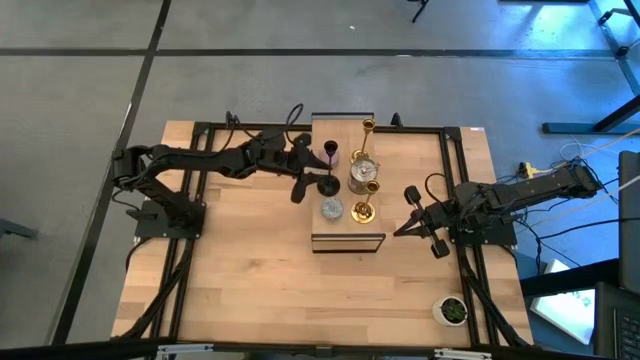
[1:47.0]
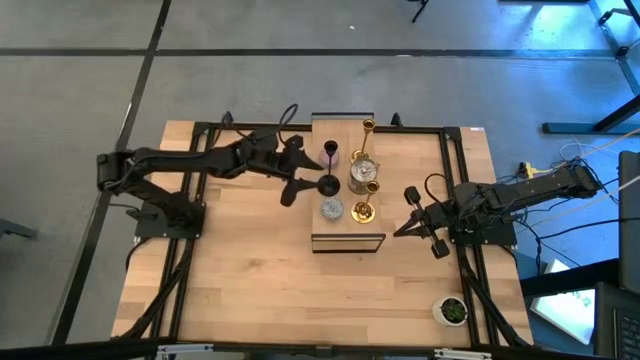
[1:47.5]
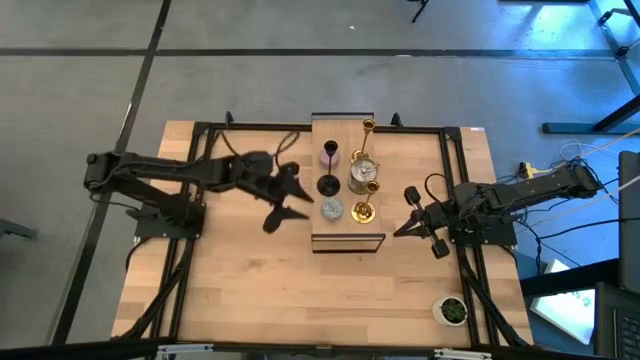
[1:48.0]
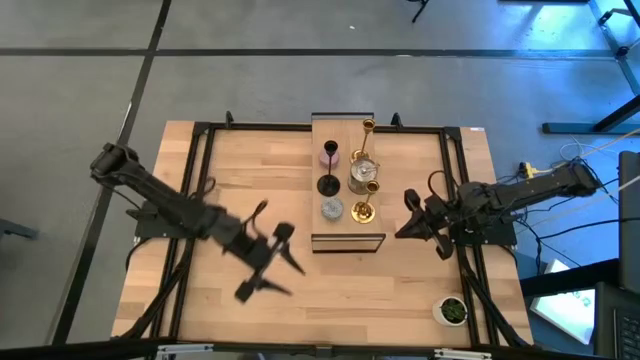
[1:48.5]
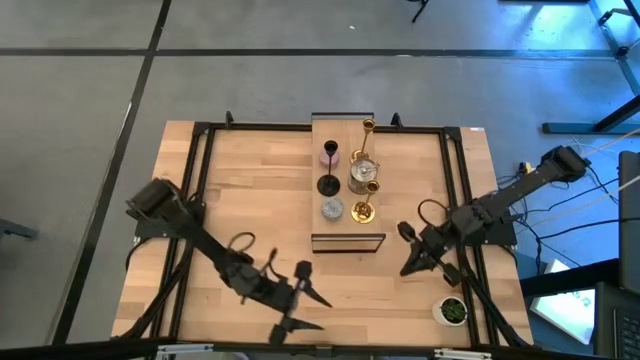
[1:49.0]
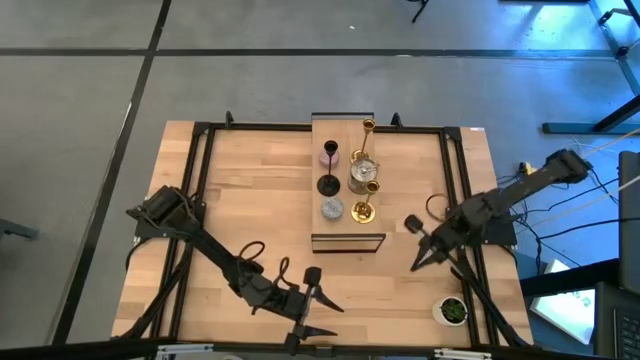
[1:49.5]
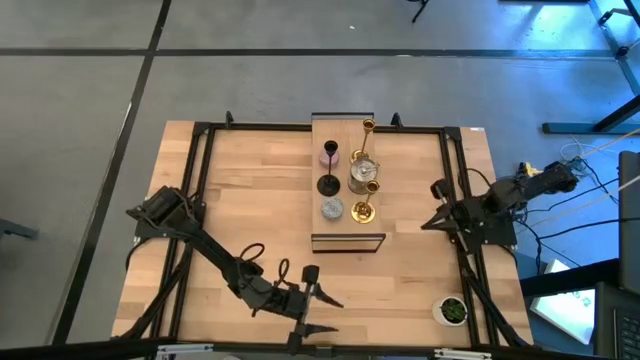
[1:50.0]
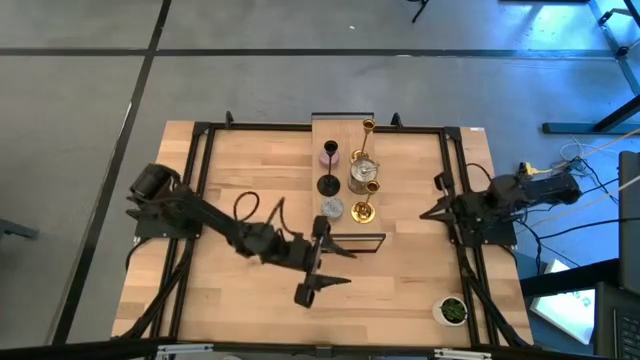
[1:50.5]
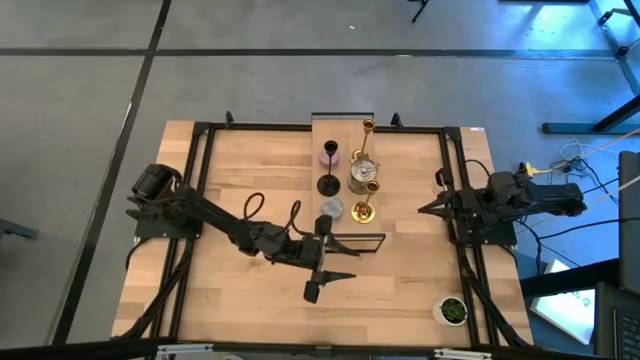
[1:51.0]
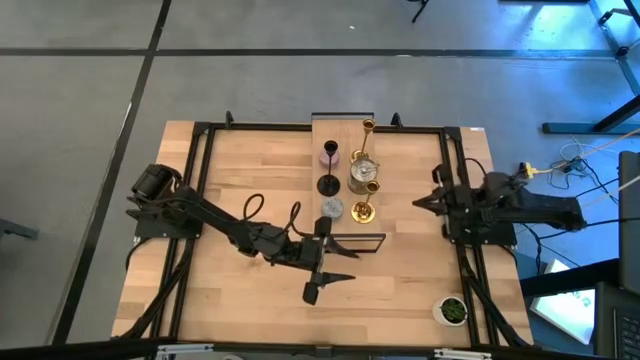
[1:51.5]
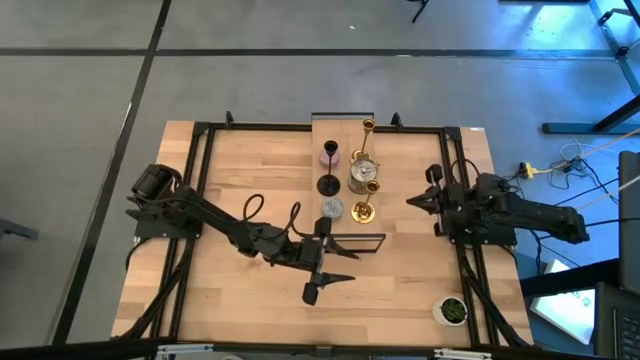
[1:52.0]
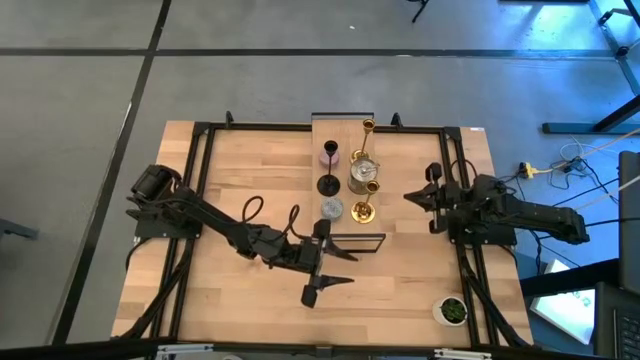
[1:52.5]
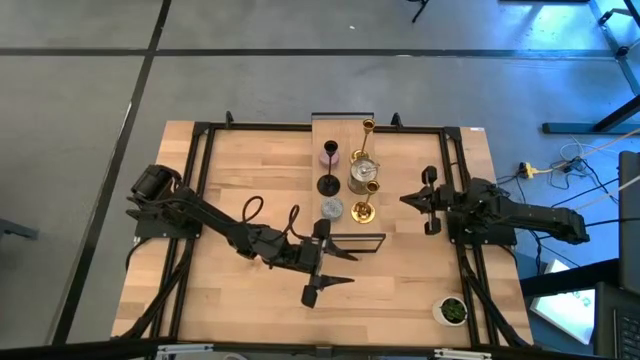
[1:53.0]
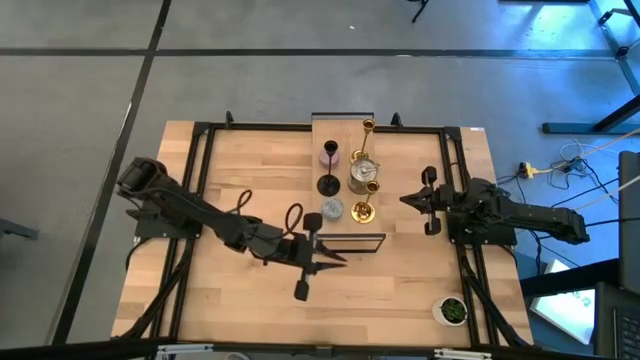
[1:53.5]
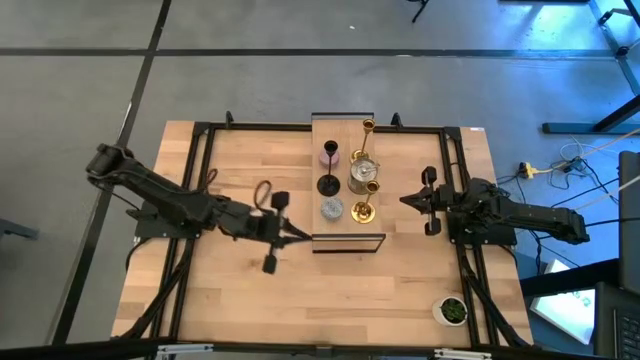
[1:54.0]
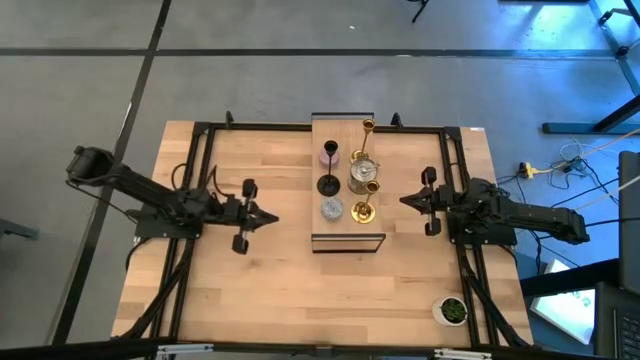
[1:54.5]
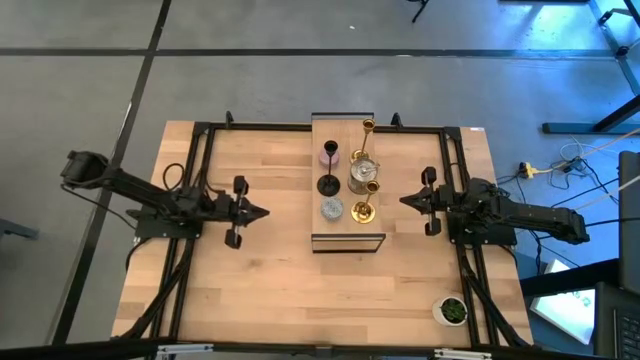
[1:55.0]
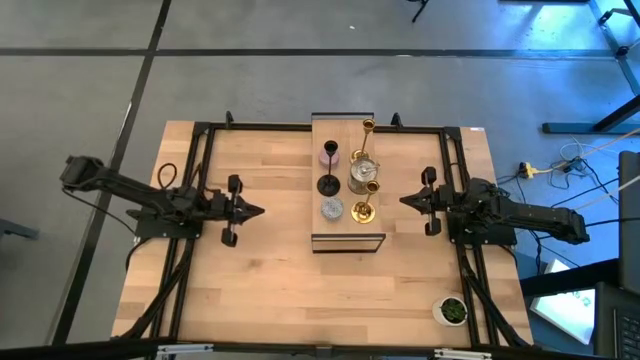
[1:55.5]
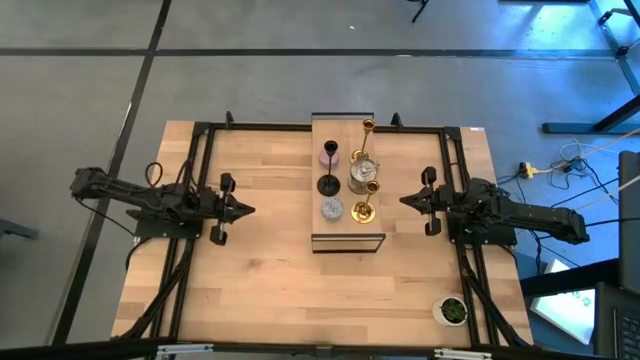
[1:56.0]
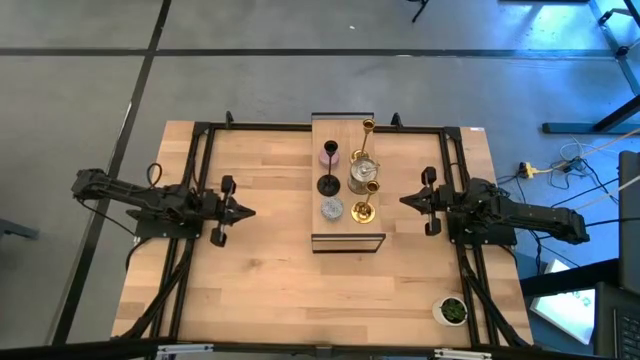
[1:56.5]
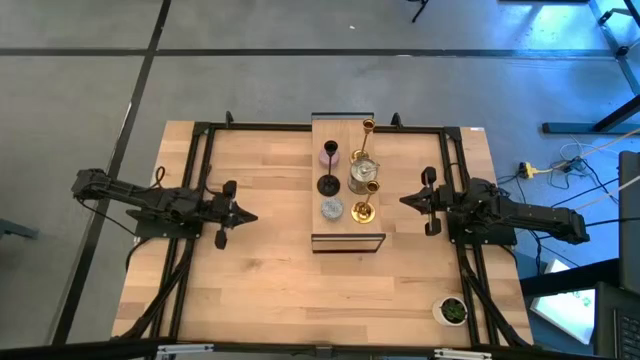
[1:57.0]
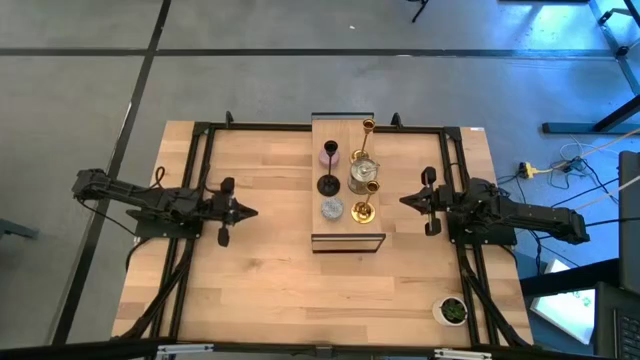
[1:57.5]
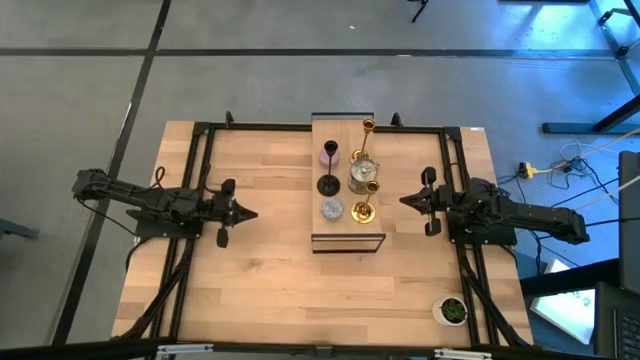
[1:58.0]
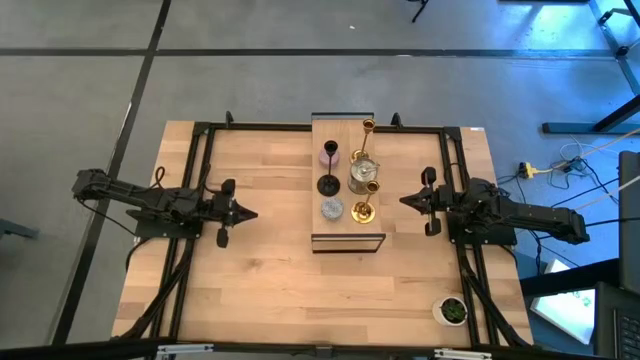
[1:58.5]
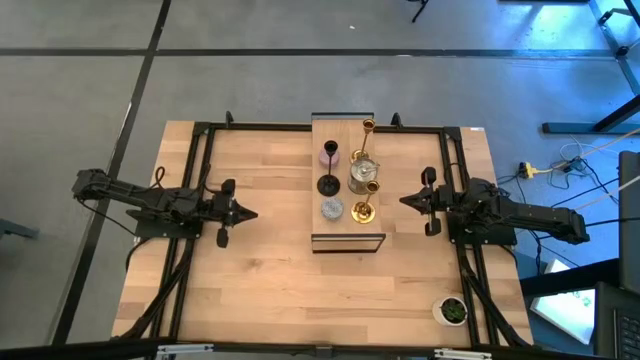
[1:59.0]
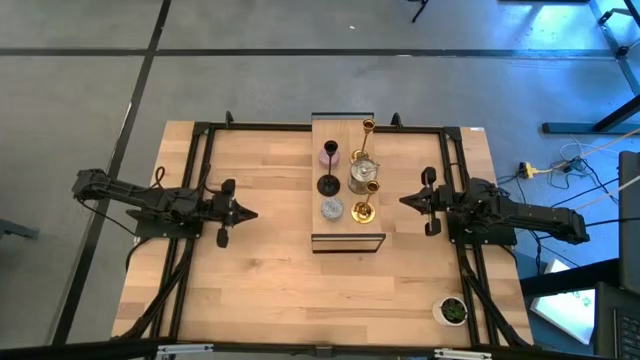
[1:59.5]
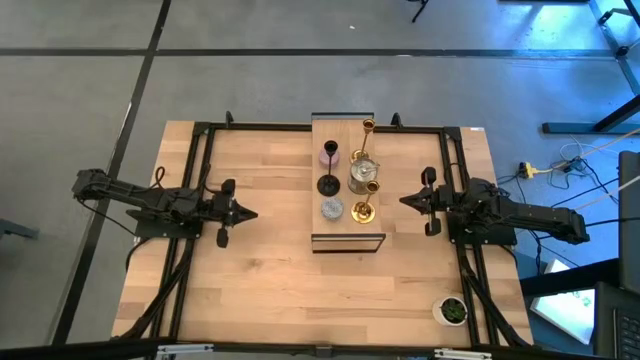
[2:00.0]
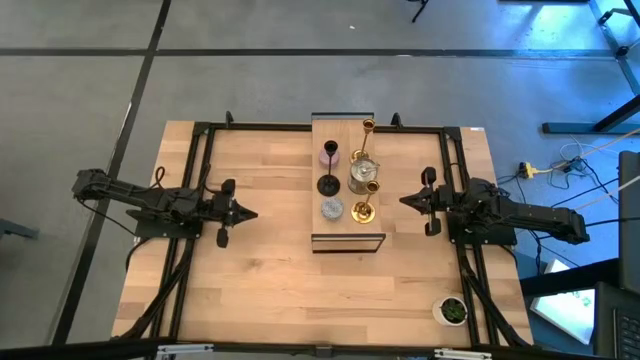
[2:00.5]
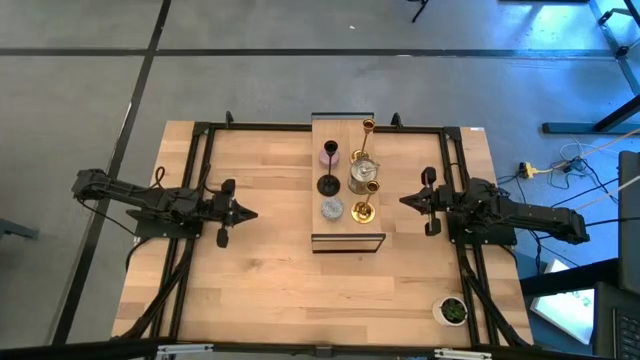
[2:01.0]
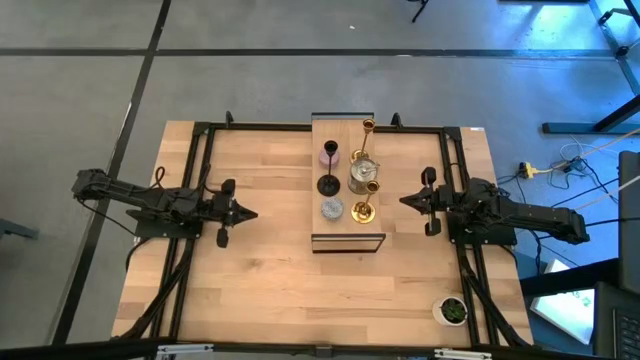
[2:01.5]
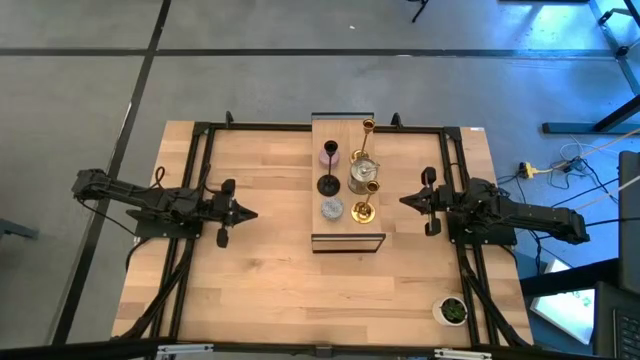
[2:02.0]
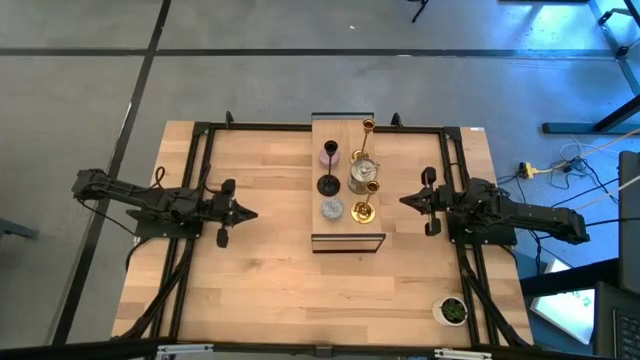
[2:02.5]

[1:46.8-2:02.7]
Task: Pick & Place candle stick holders
Return to Home Position

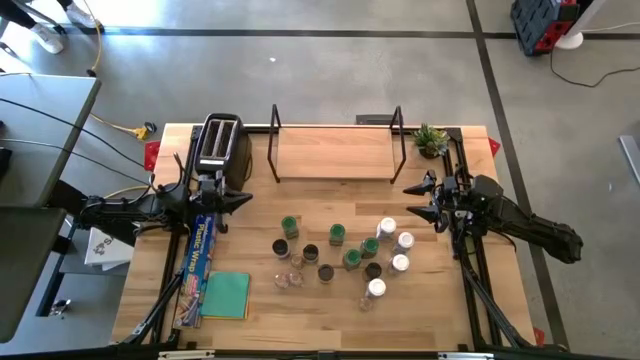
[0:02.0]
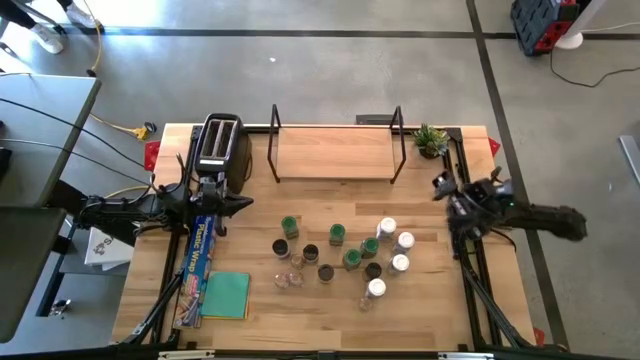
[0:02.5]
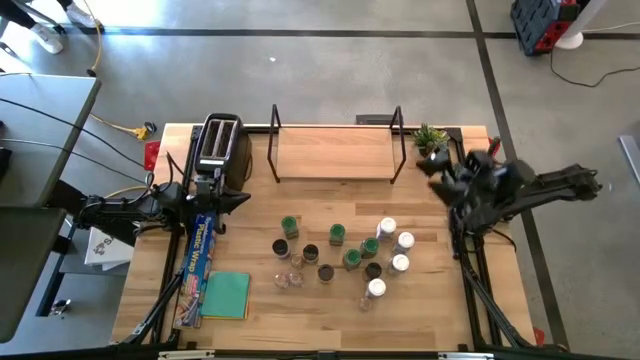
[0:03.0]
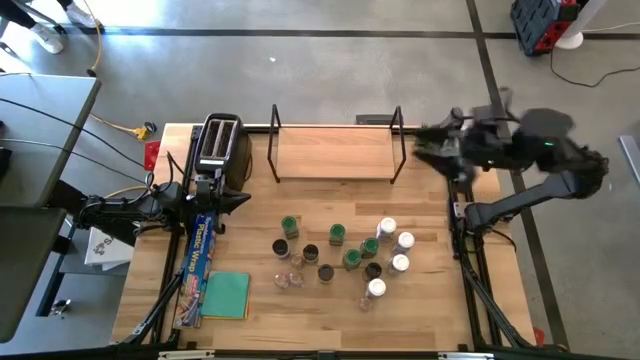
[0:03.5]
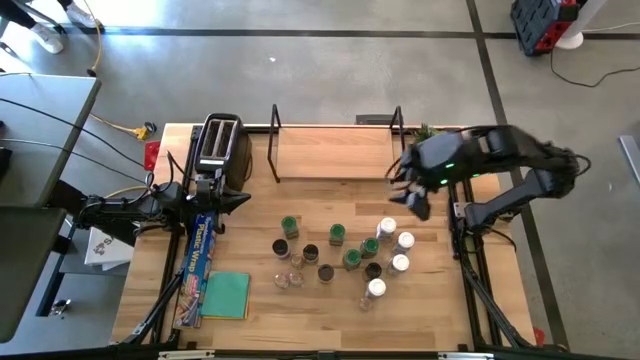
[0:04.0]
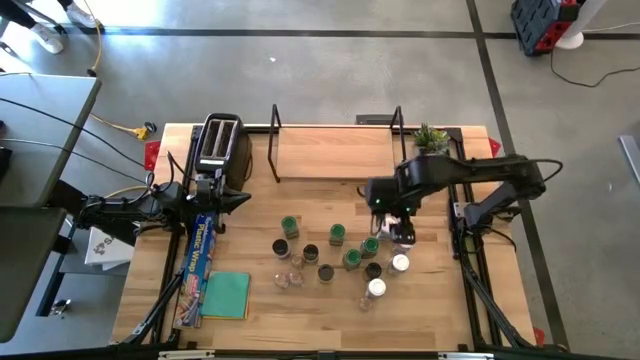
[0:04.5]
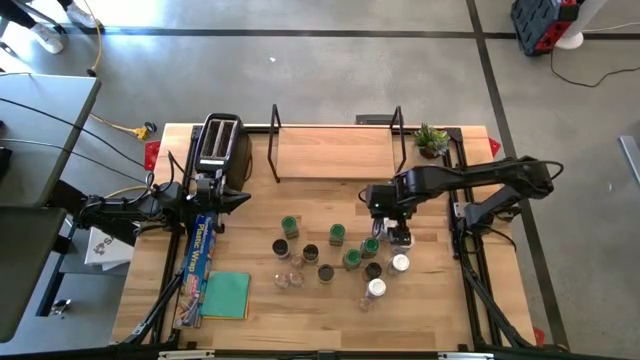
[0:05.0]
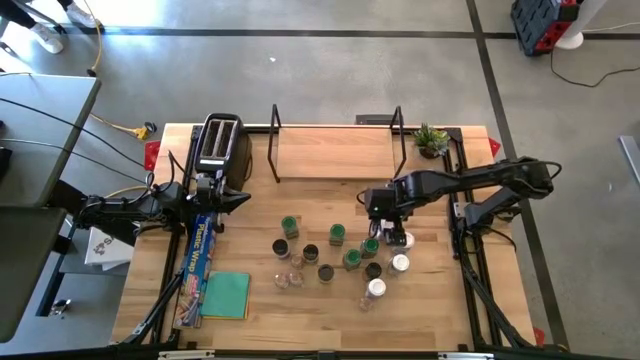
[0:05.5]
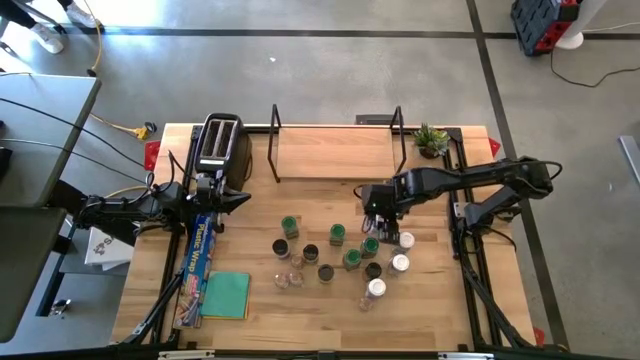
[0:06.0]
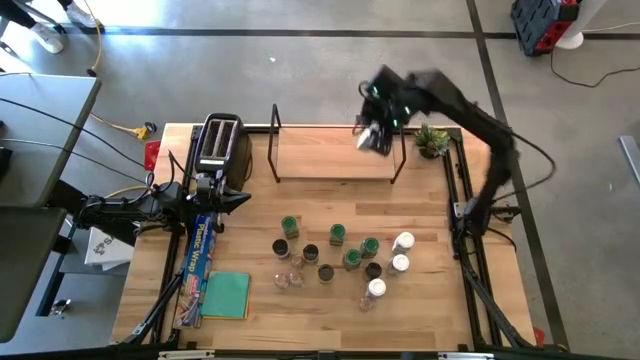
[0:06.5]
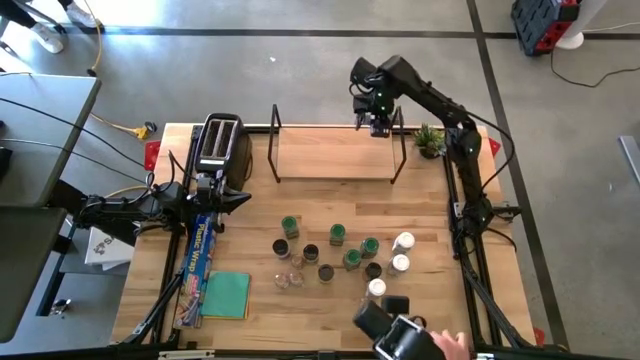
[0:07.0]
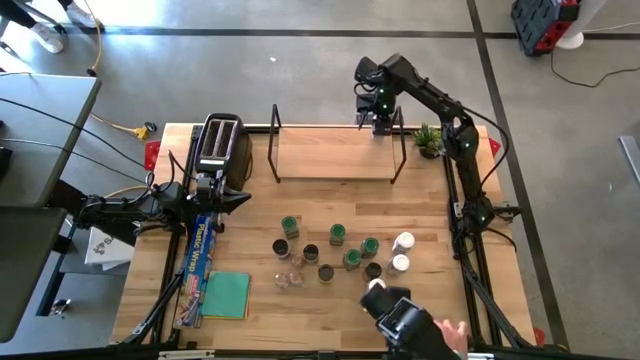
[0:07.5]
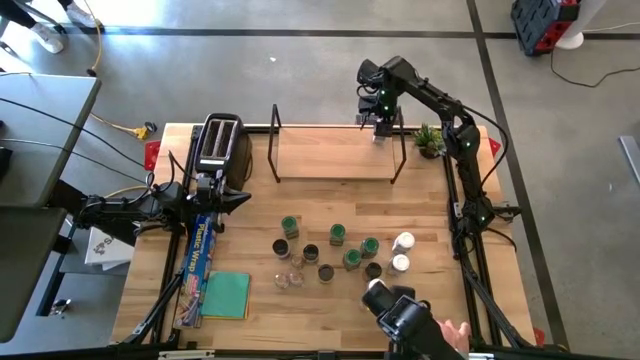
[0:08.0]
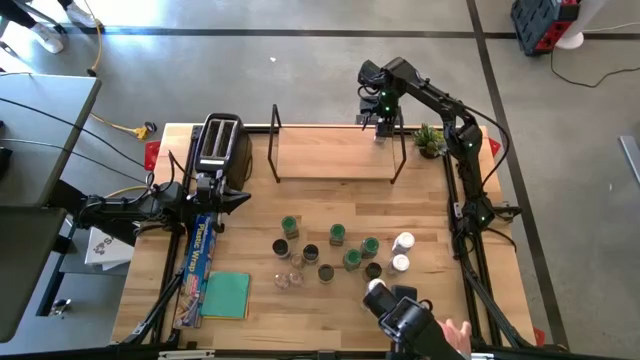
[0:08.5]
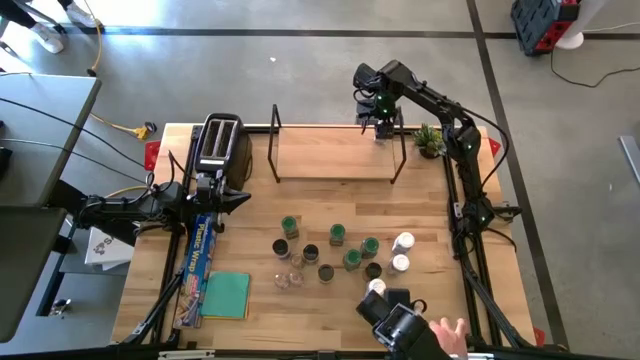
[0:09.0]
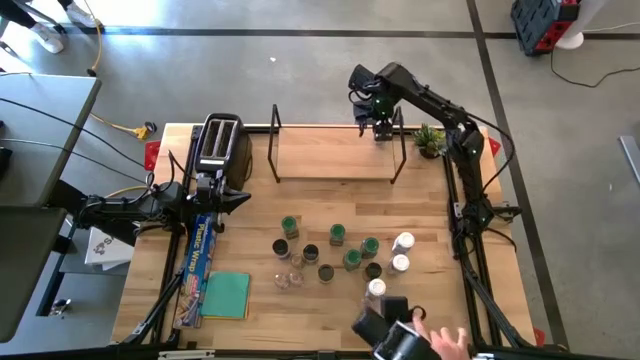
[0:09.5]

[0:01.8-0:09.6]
Task: Shelf spices
Put the white seasoning bottle on the shelf
